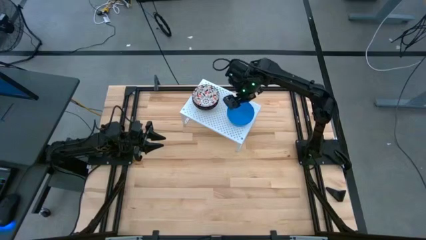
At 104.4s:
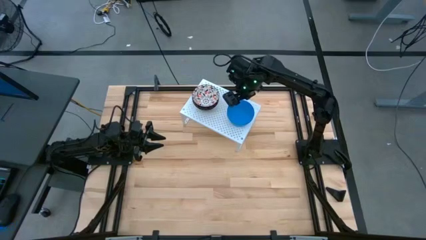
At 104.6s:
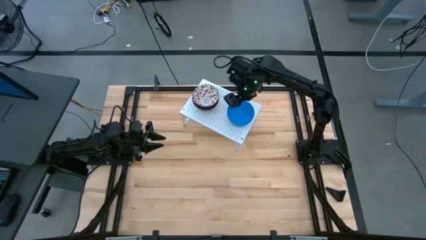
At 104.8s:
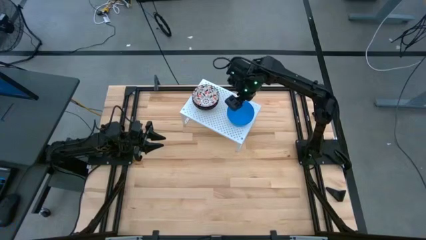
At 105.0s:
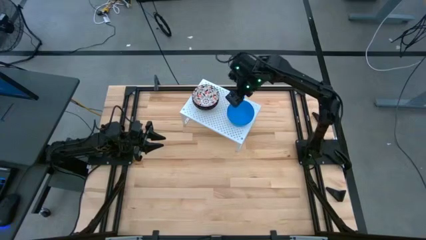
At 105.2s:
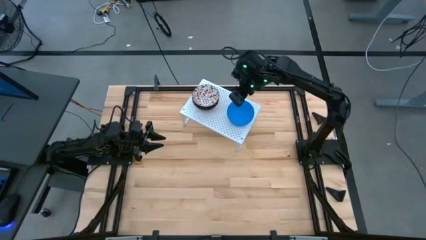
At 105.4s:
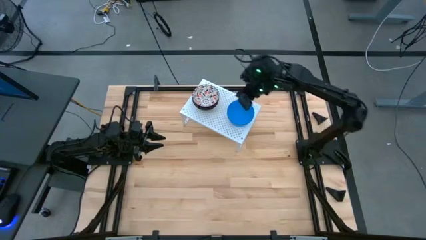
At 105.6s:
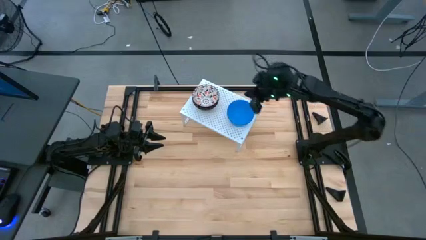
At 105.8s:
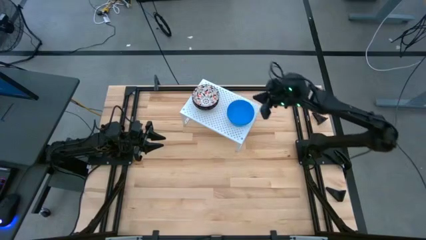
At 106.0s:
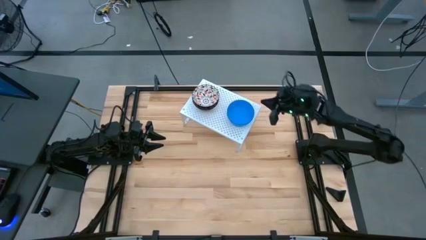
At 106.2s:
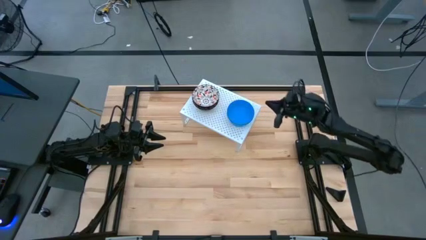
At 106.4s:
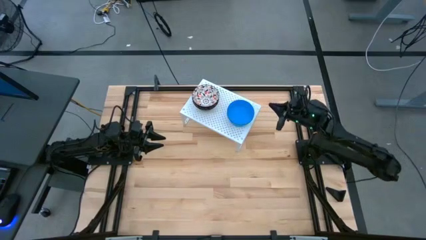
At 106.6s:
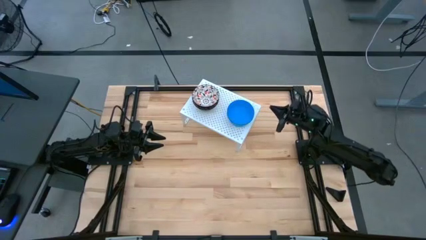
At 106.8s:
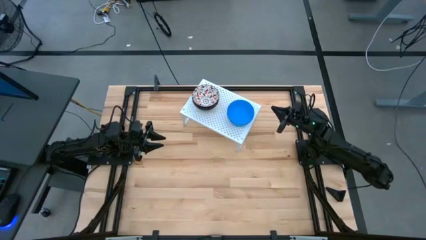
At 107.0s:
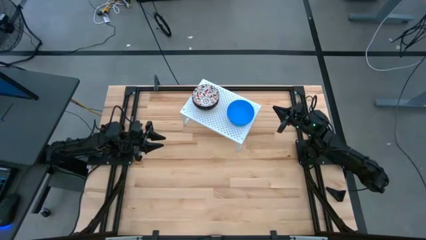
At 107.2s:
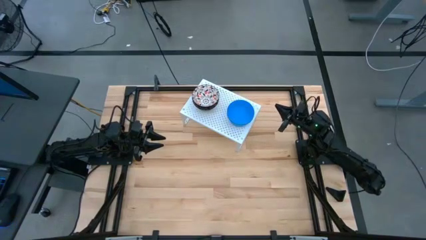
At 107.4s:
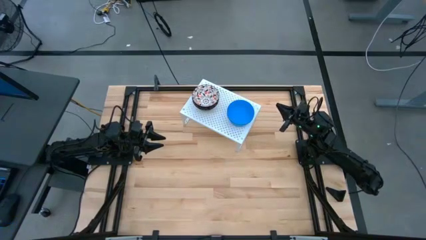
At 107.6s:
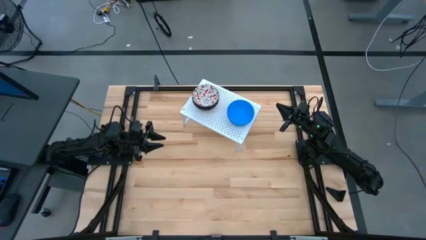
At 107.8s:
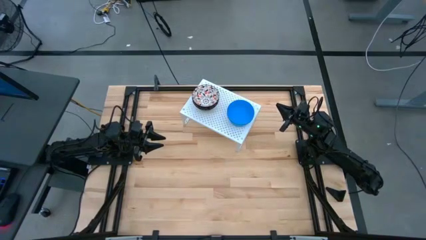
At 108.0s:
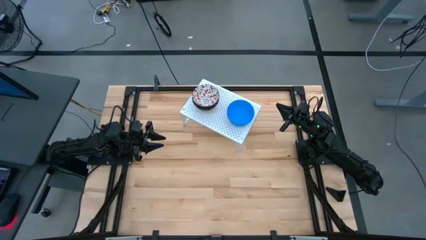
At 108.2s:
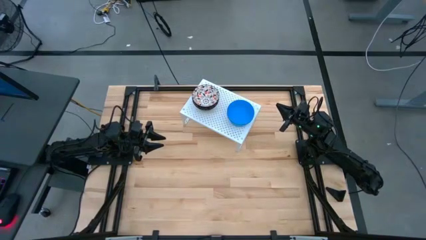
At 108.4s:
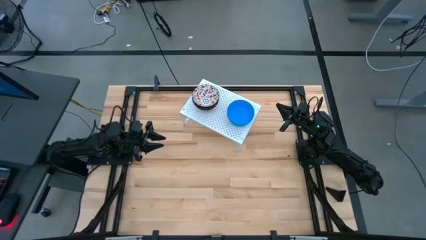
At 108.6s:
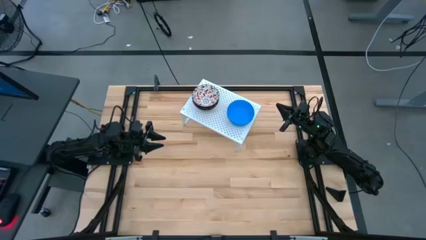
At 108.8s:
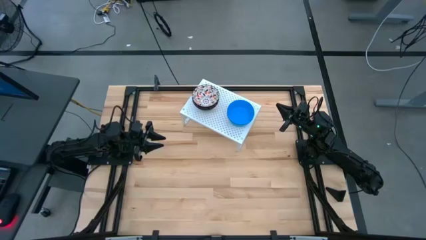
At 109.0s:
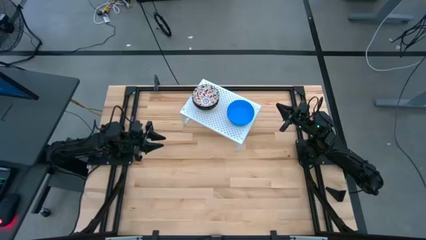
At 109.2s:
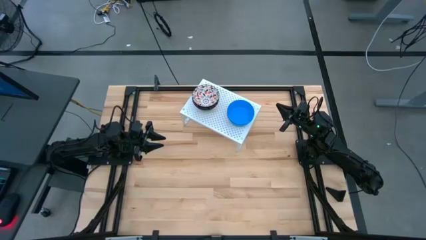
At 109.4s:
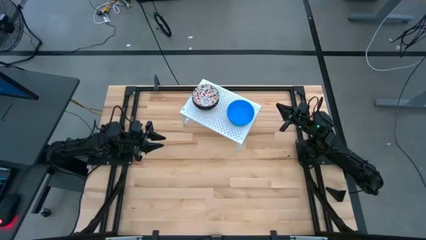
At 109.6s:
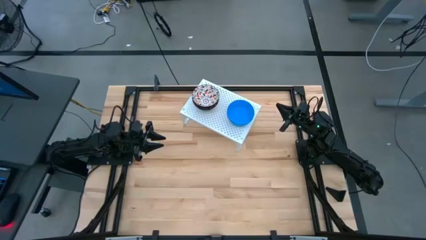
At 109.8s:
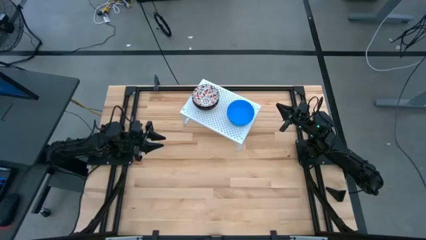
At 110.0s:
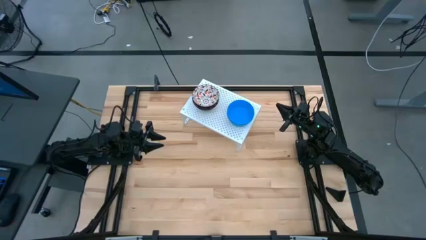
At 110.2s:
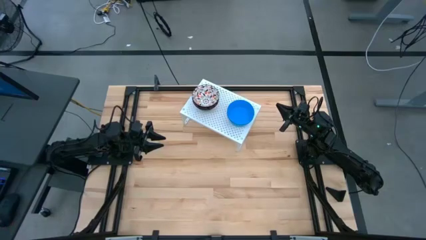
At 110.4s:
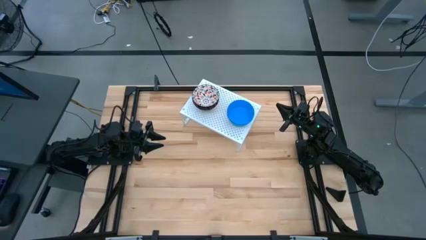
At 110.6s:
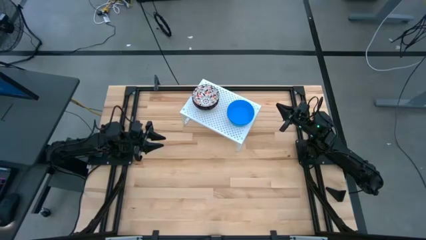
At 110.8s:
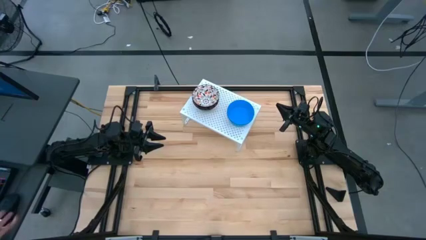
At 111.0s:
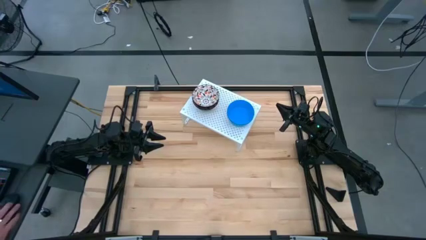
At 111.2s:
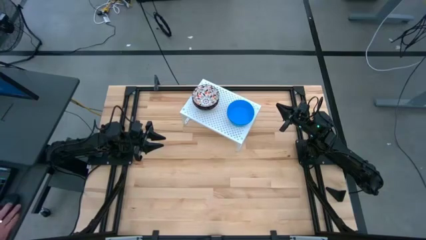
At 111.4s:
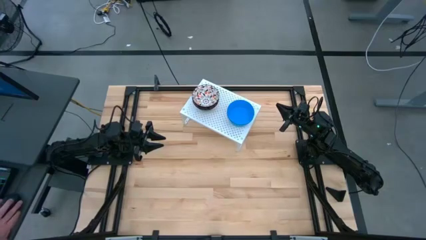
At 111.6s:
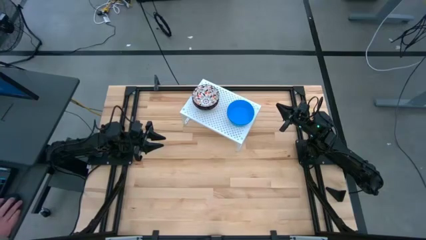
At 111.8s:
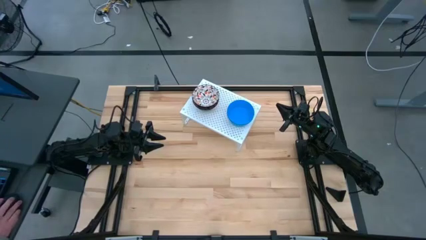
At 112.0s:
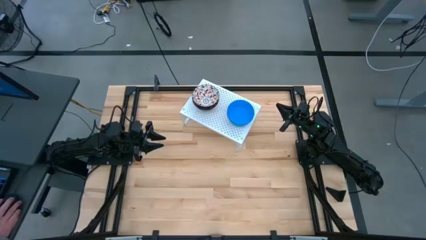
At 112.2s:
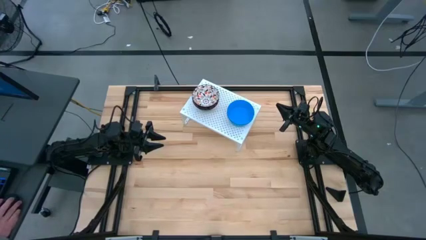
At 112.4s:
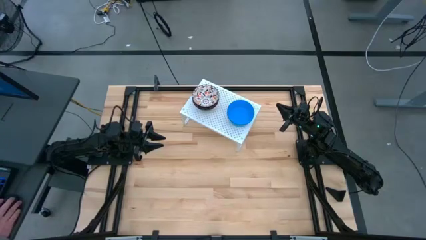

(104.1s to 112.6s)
Task: Pick & Place Mini bowls
Return to Home Position

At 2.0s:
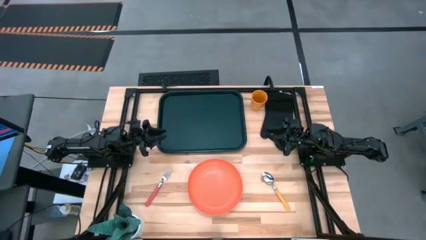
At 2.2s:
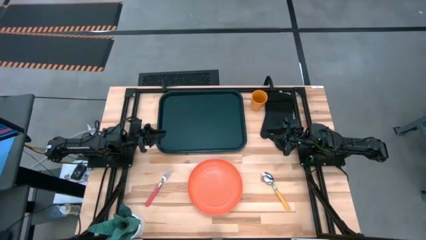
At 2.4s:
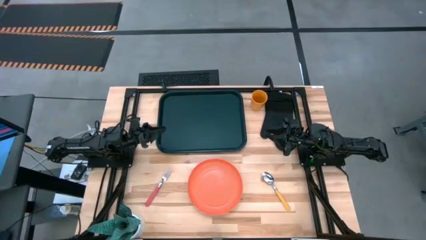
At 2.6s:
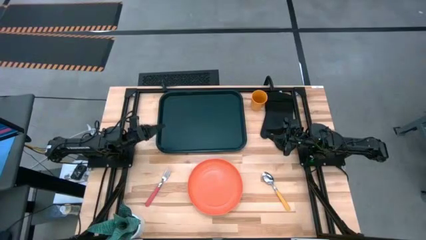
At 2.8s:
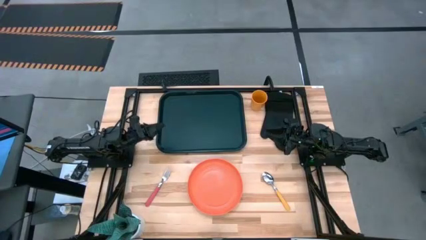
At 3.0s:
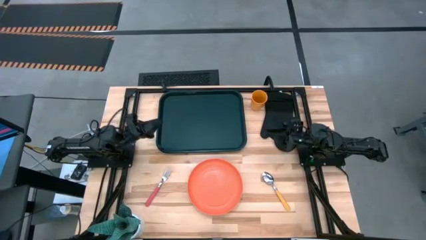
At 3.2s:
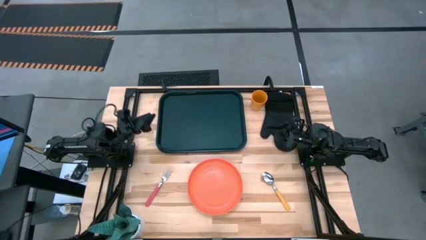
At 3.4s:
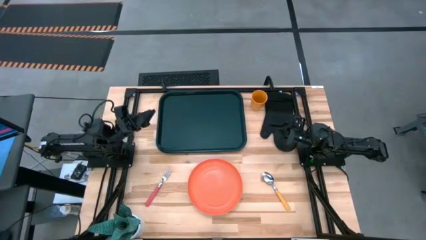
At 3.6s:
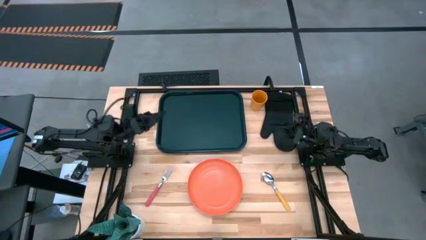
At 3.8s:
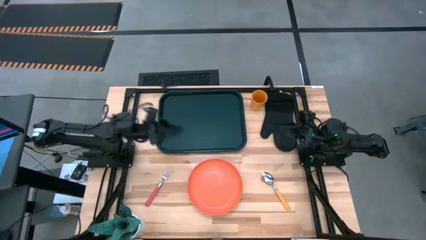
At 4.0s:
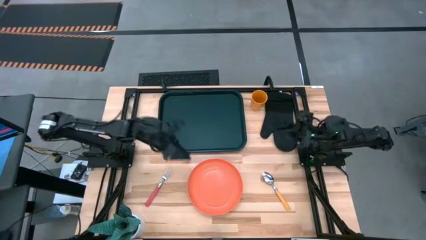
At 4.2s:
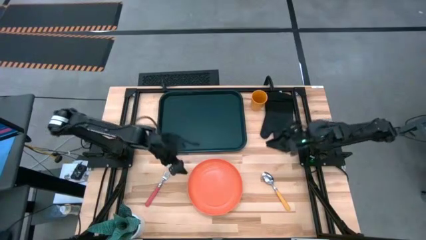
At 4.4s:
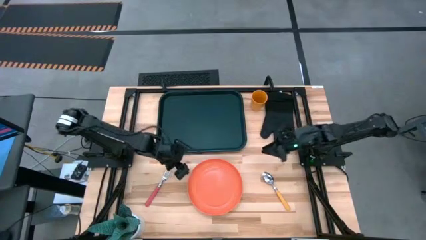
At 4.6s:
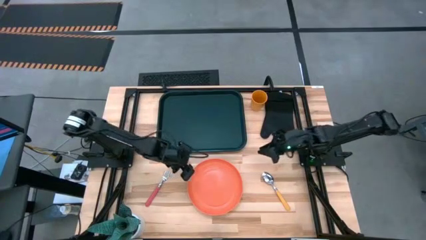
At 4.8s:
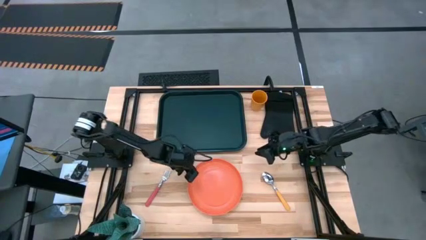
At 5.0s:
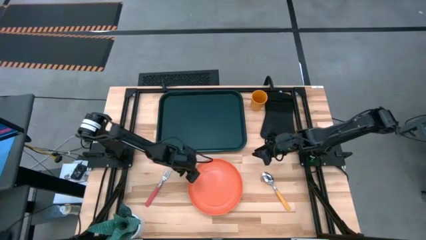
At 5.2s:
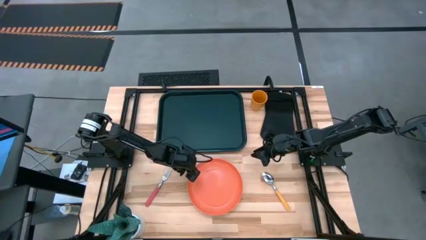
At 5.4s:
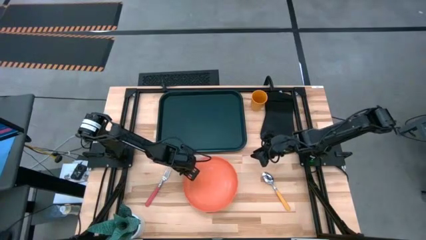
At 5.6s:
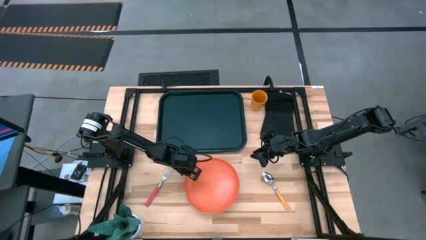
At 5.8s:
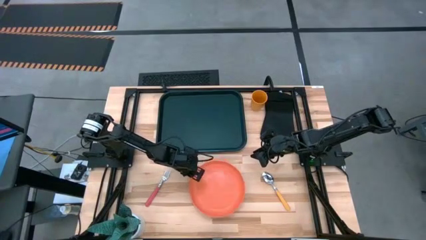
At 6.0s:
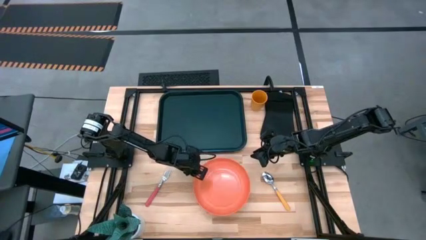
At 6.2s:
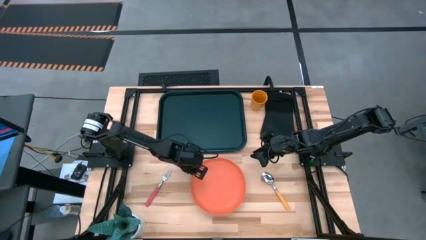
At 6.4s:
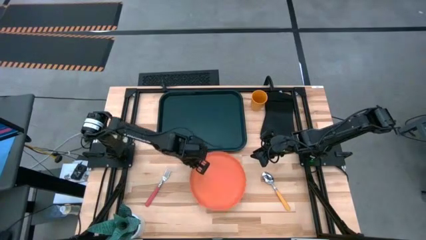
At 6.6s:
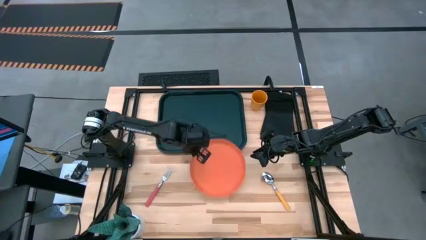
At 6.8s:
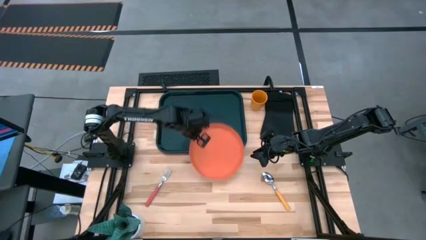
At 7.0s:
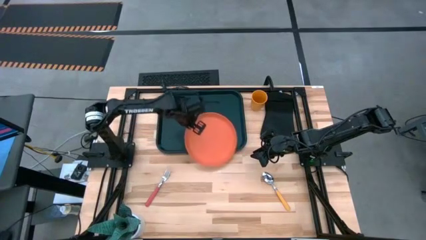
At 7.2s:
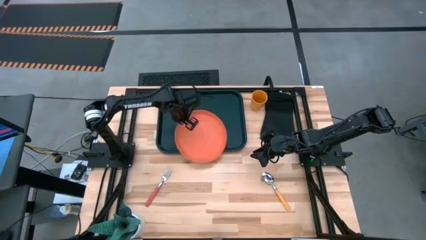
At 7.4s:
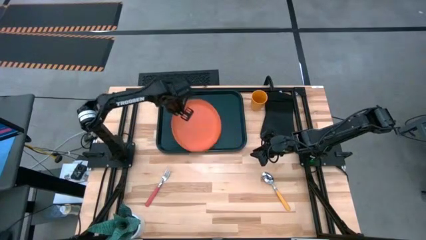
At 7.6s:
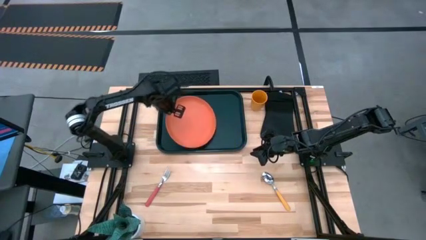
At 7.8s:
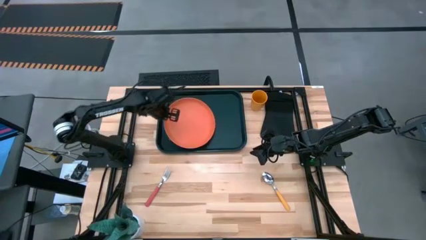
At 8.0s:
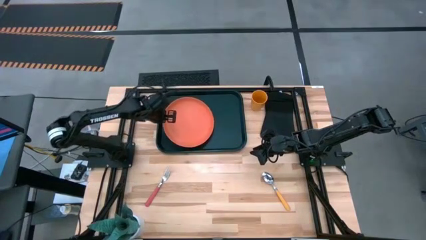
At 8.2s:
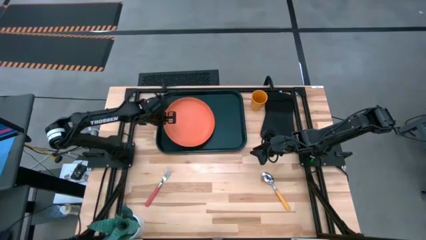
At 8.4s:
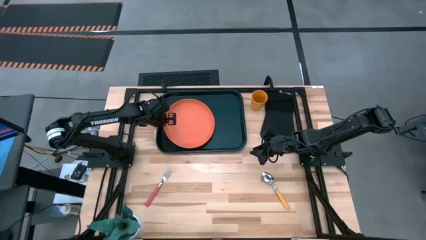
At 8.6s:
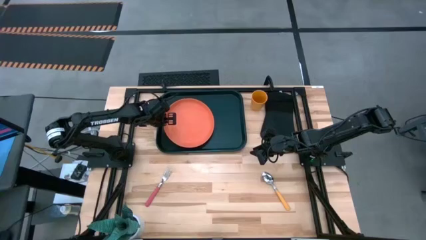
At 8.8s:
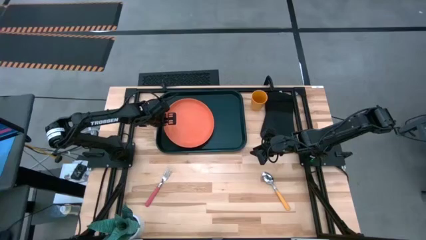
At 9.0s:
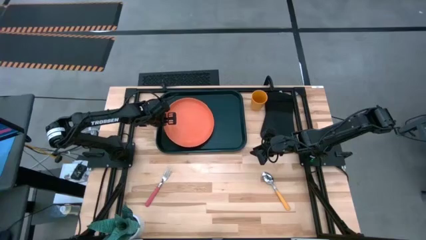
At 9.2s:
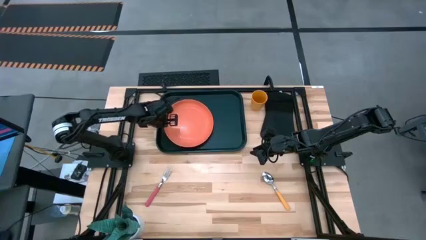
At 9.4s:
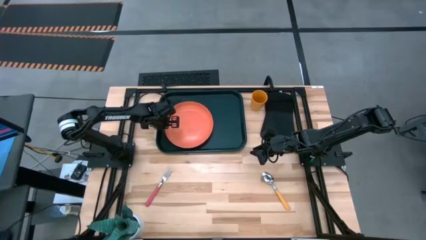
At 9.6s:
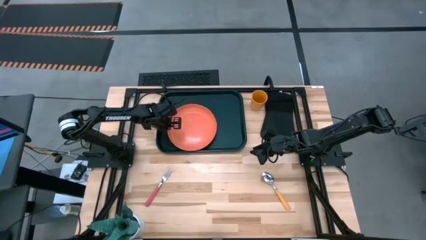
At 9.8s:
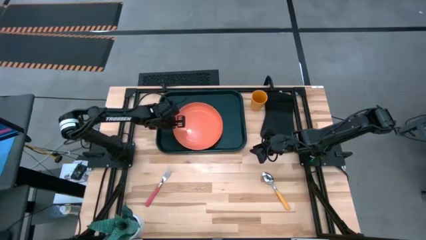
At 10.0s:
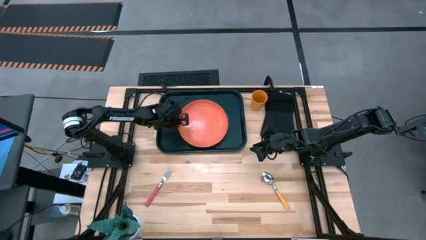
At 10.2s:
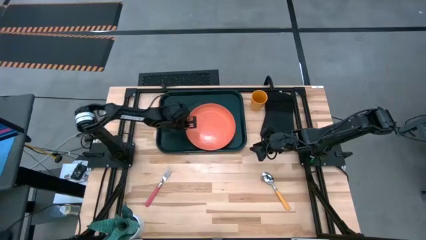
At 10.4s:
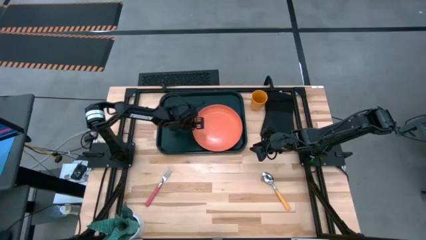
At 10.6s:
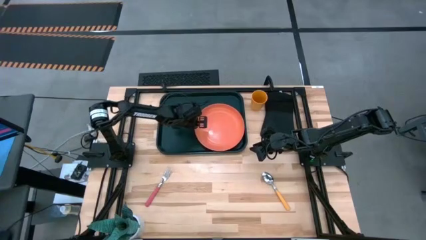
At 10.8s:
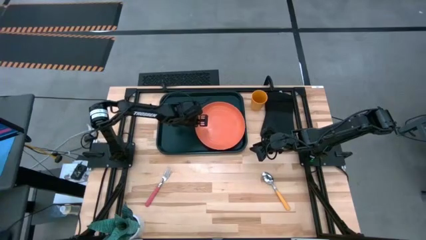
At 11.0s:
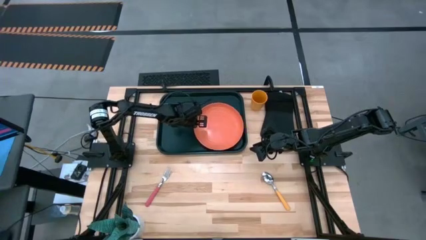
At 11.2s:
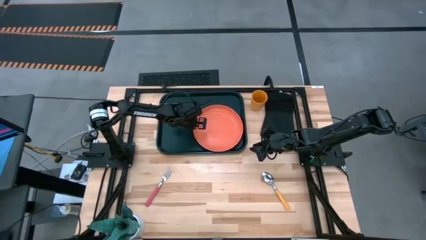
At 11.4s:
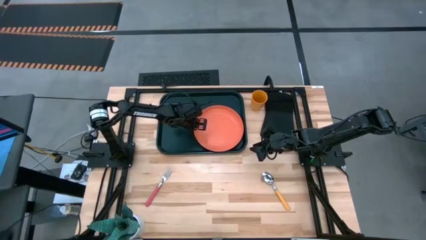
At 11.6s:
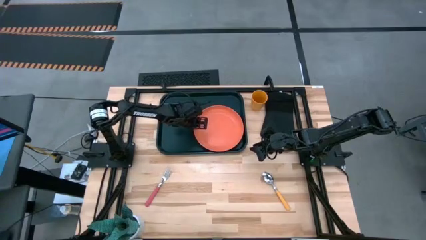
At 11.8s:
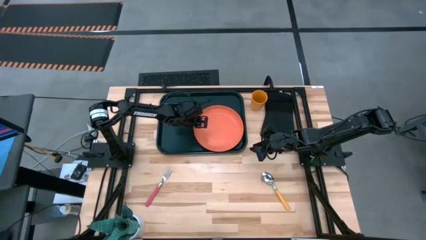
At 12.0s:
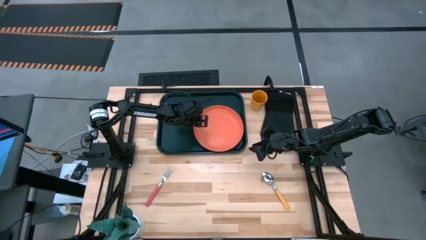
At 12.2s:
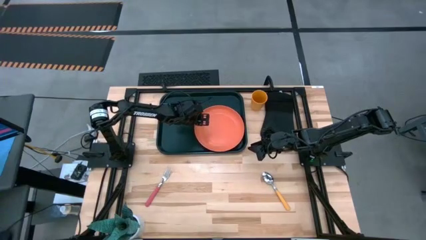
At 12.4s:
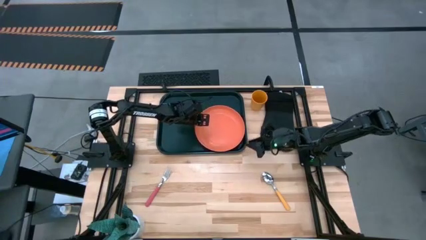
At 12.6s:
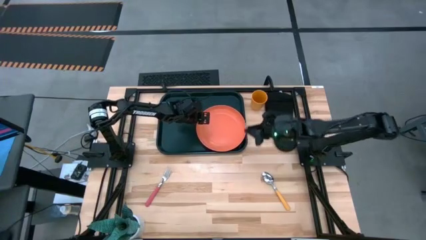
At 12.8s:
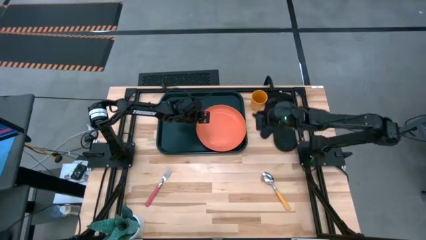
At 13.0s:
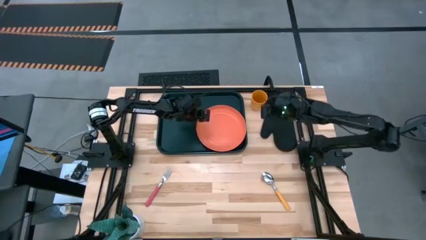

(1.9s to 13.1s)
Task: Pick and place plate/cup/fork/spoon on tray
Put the orange plate on the black tray
